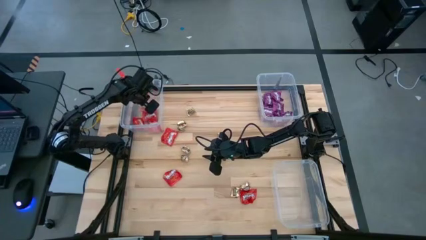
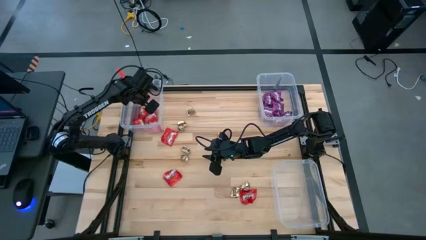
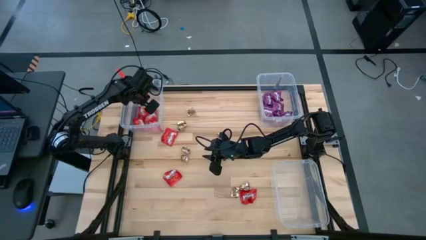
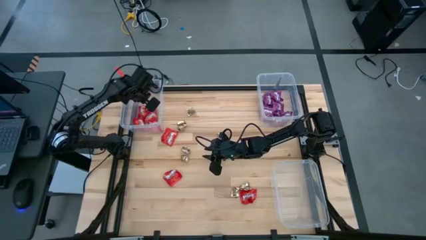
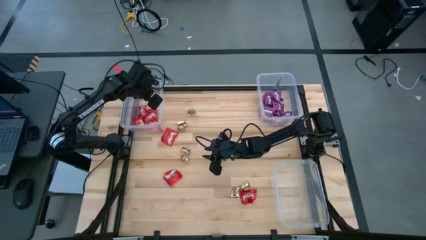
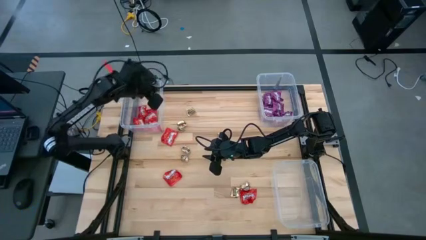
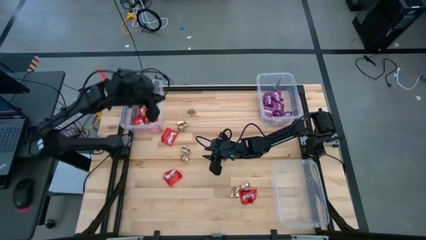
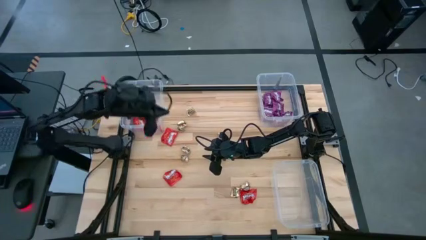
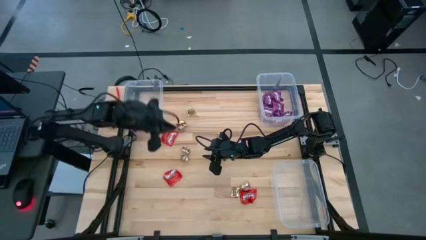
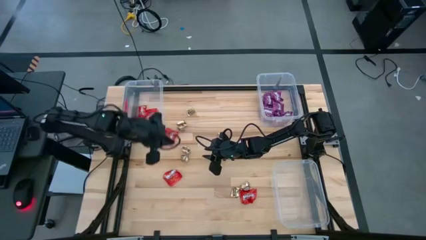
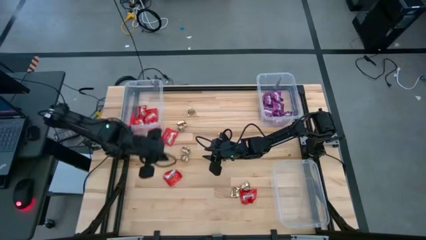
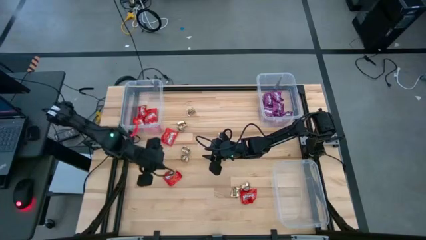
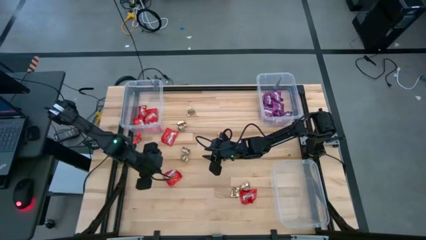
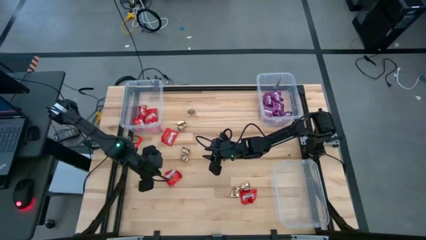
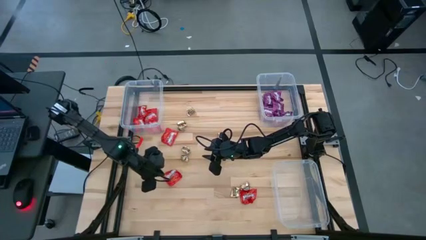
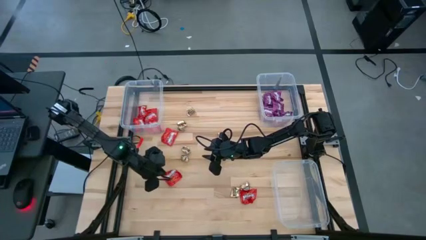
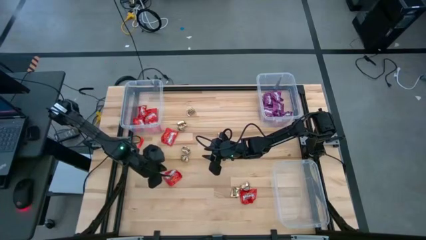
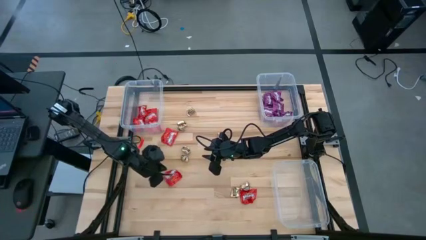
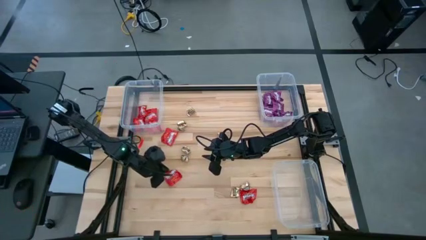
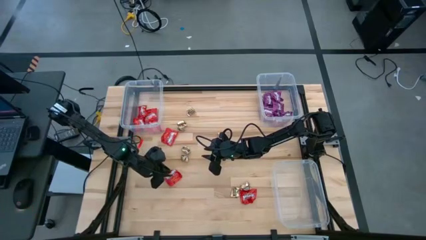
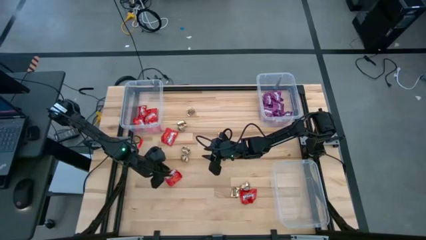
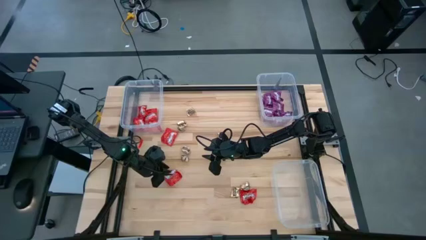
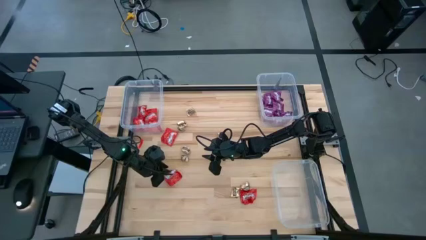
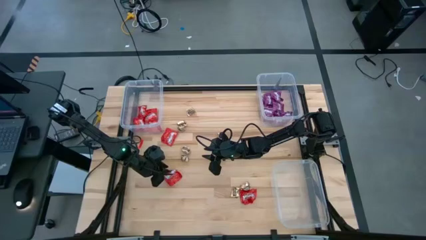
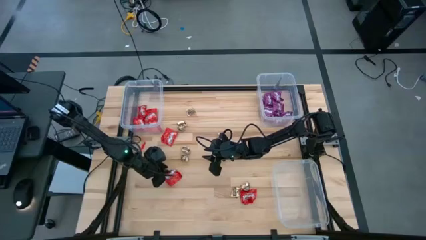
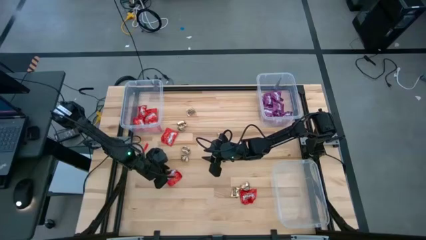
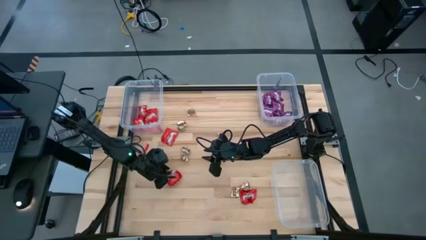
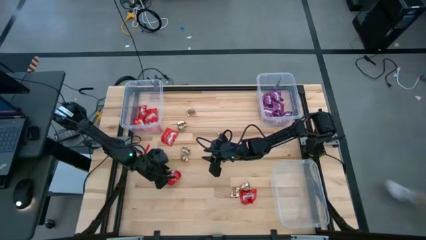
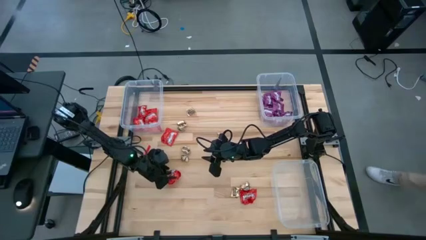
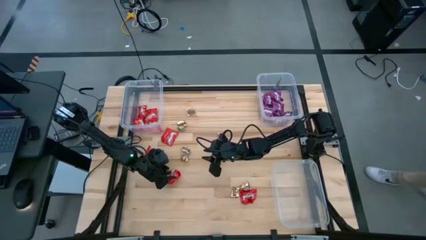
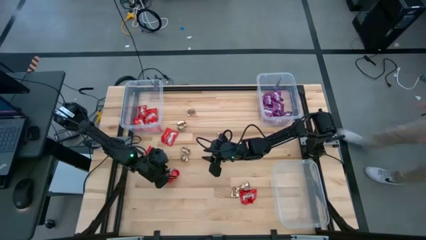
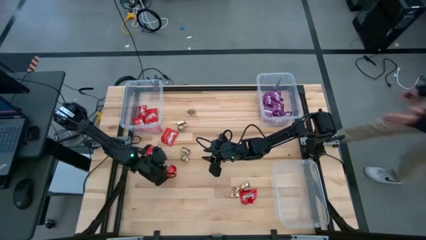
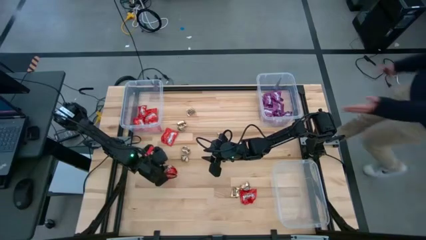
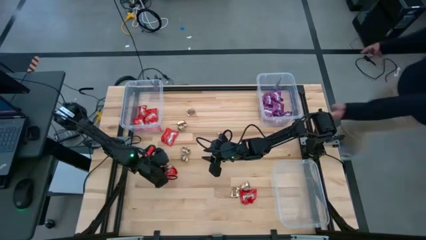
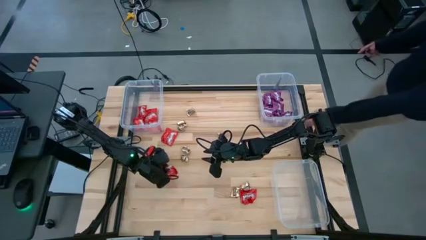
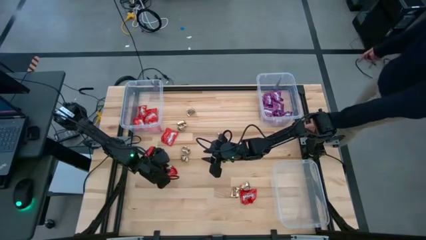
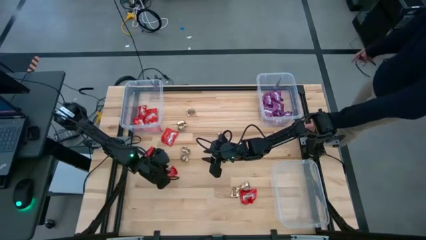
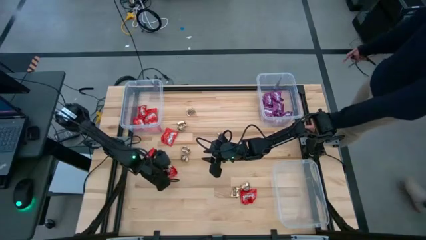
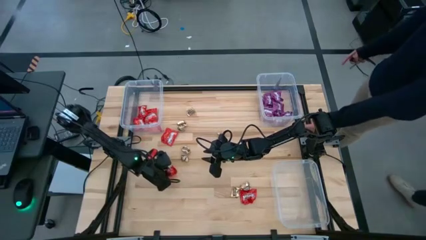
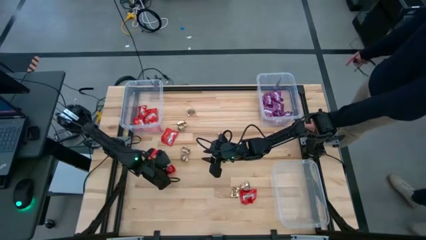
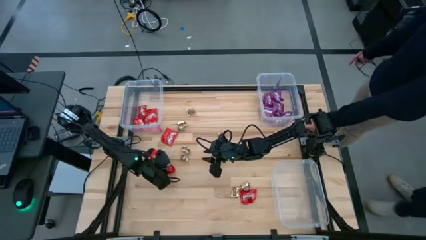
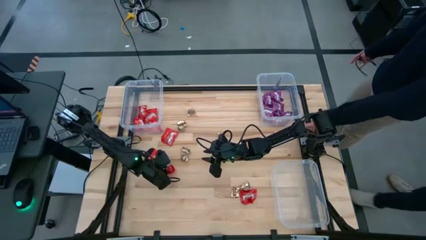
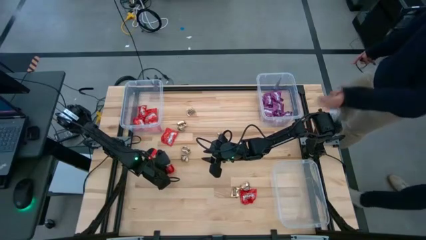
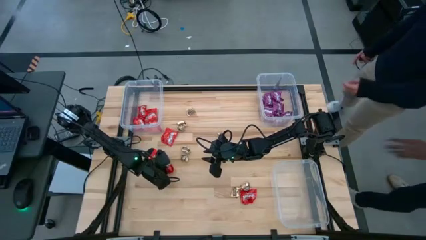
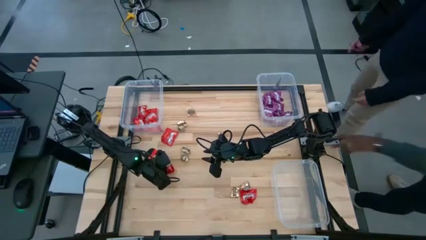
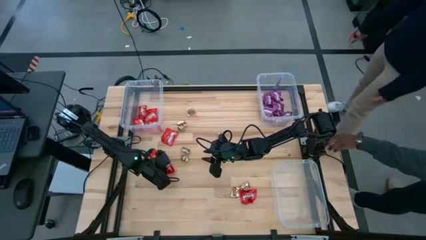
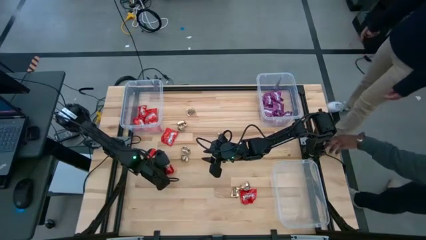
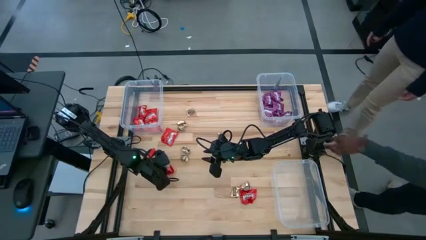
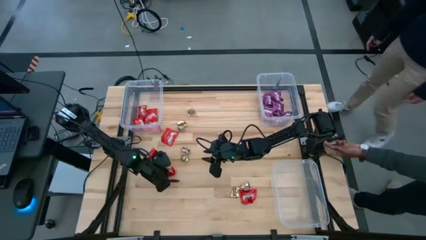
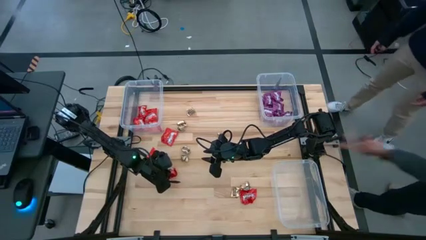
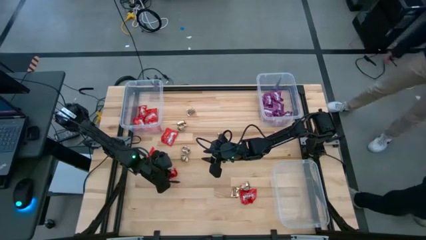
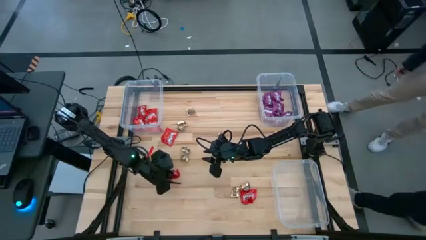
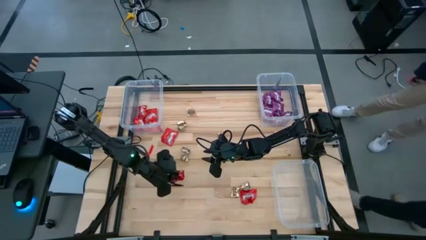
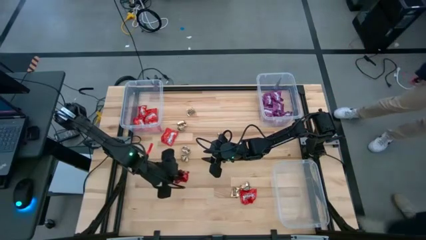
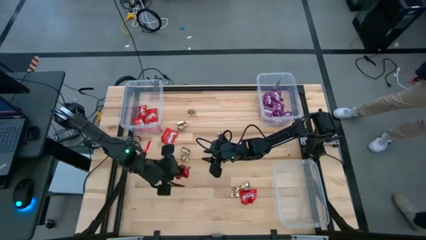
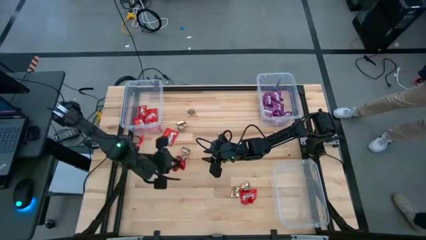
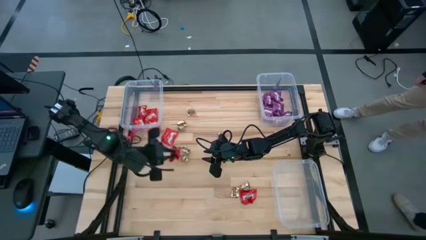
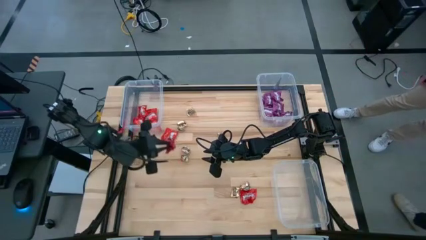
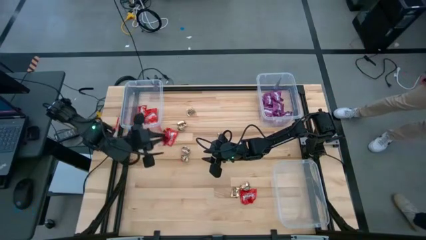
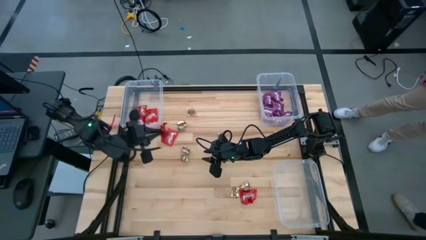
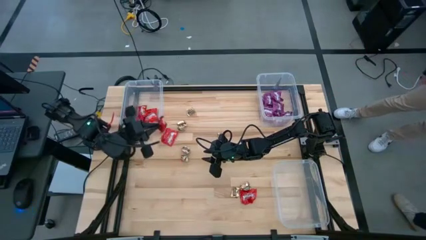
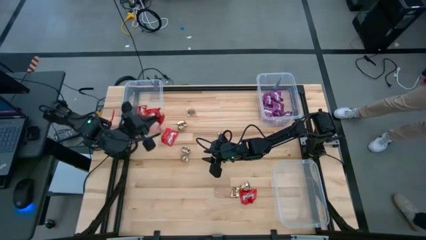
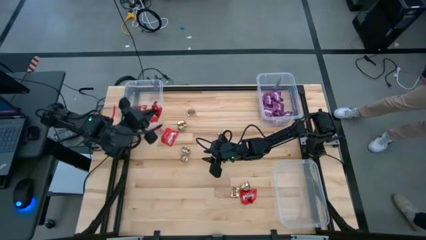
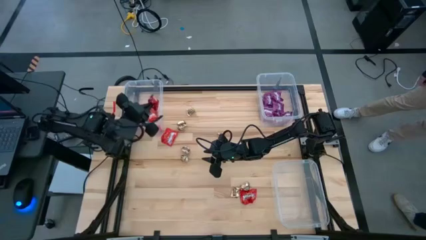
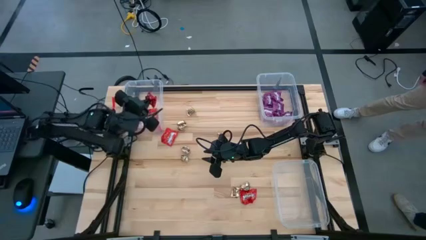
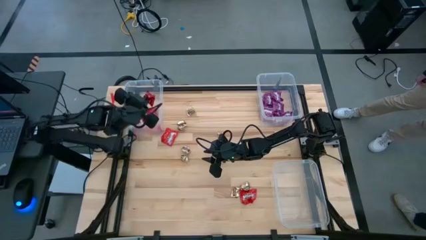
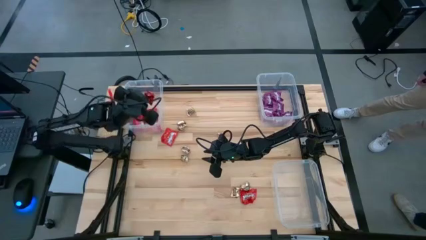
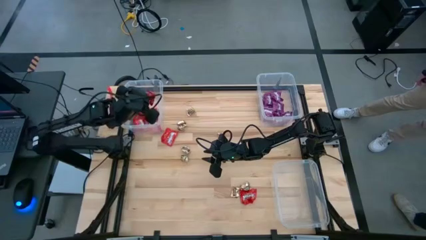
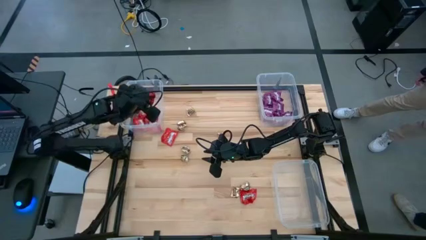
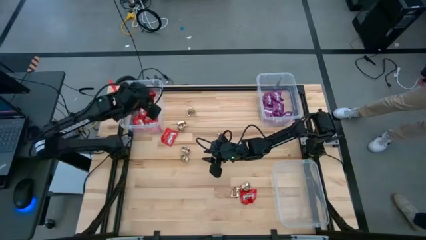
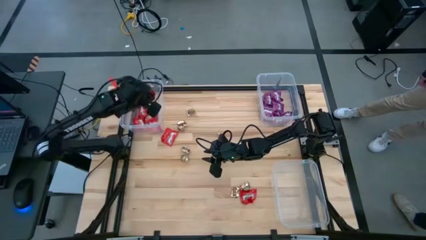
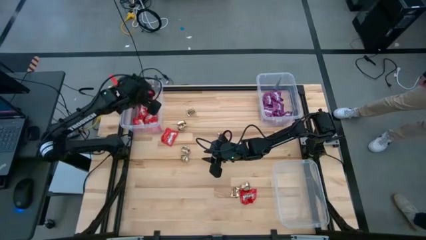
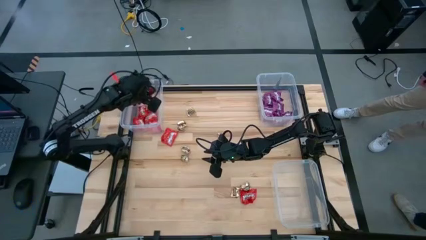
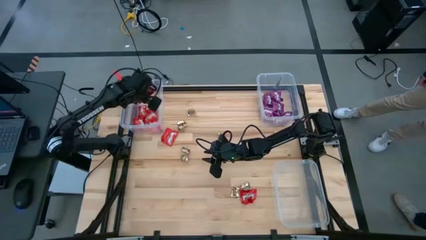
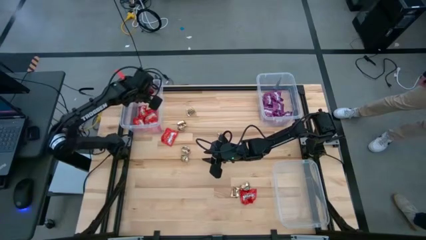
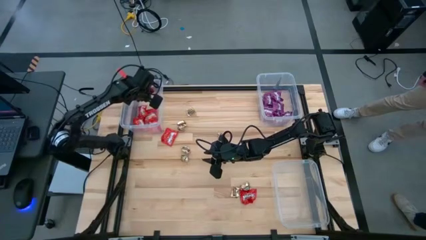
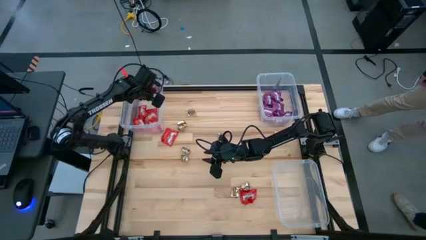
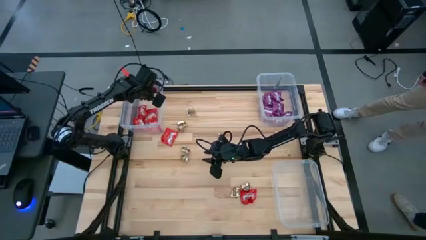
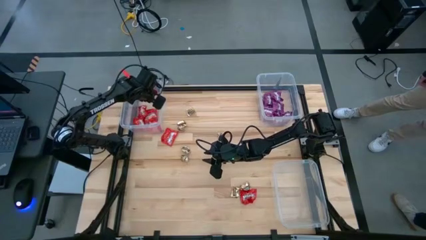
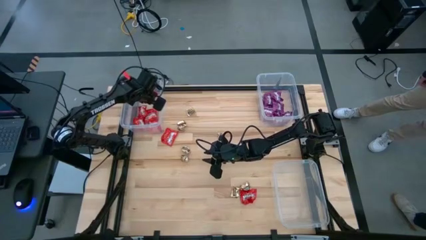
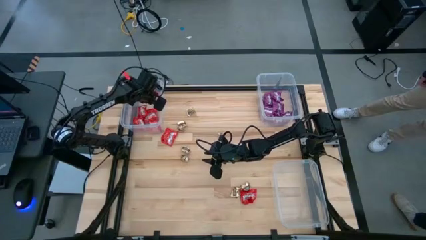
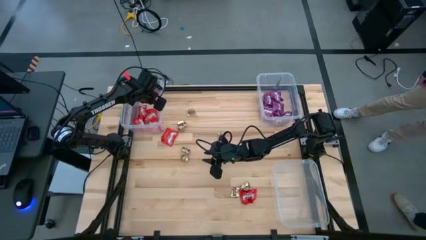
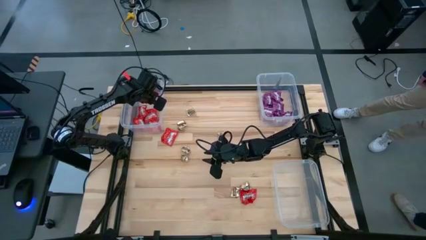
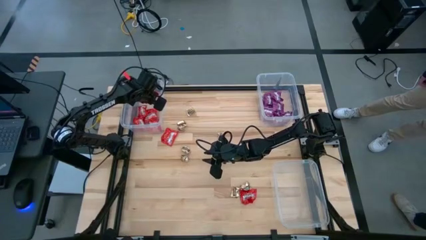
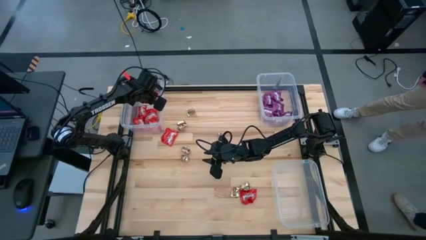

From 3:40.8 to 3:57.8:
Task: Sort candy
Put the red candy into the top left transparent bin

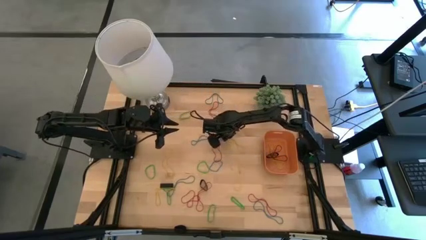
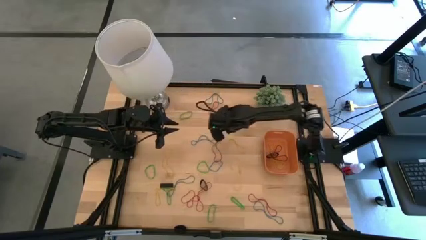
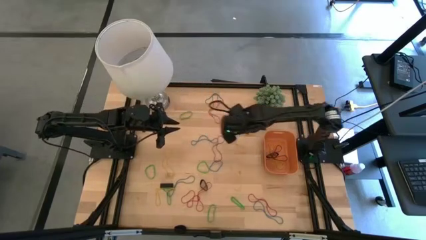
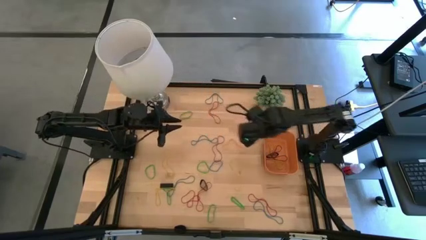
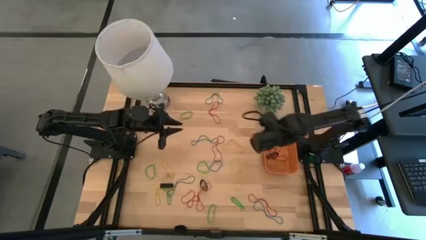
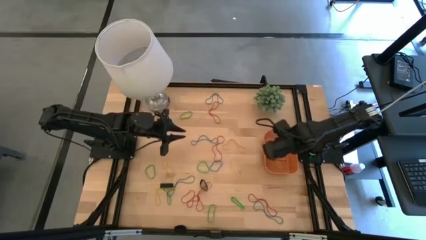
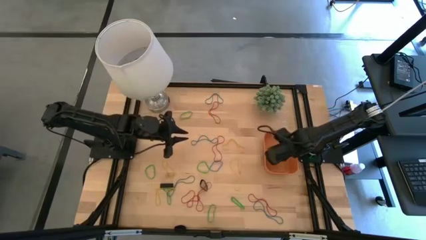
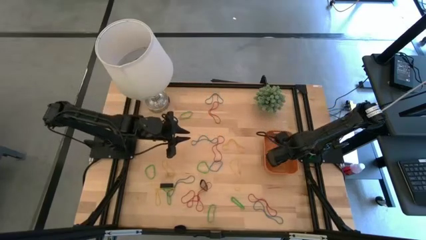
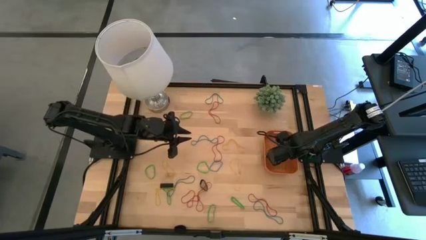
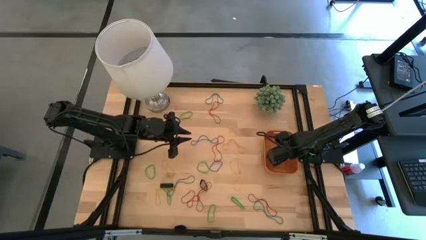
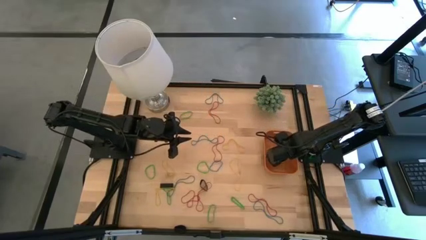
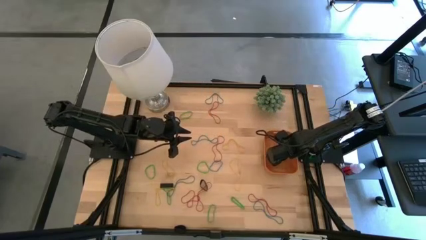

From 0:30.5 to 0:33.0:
Task: Pick and place rubber bands into bin
Put the blue rubber band into the orange bin
